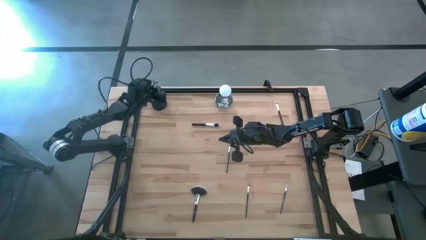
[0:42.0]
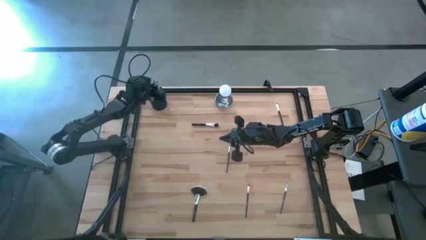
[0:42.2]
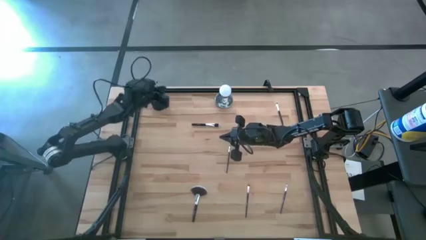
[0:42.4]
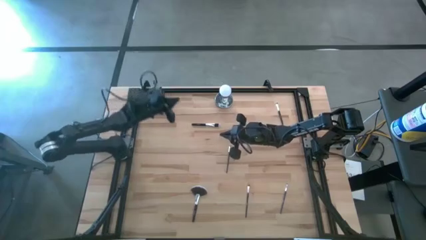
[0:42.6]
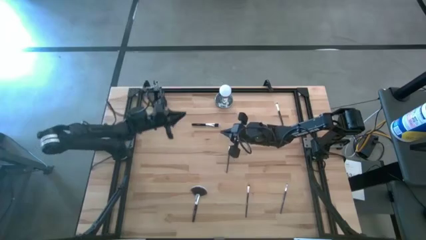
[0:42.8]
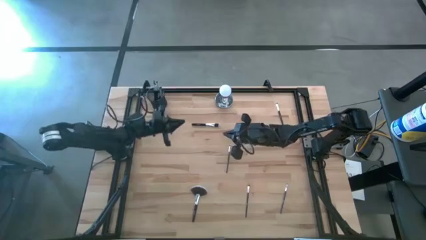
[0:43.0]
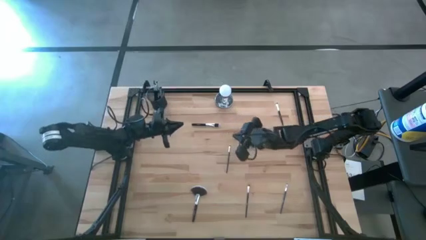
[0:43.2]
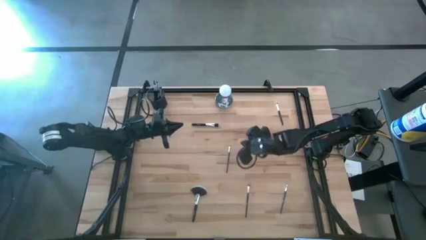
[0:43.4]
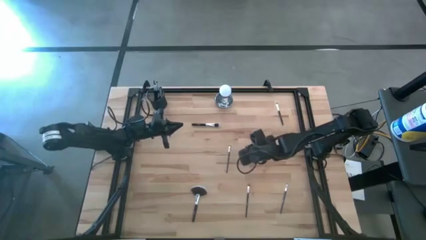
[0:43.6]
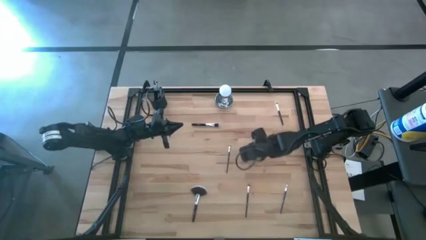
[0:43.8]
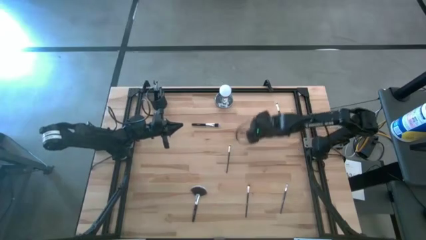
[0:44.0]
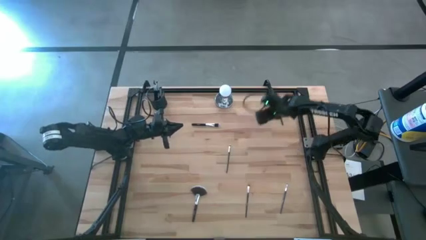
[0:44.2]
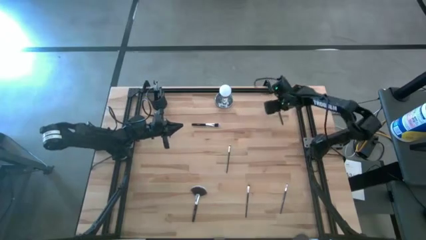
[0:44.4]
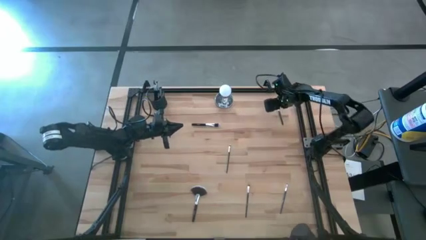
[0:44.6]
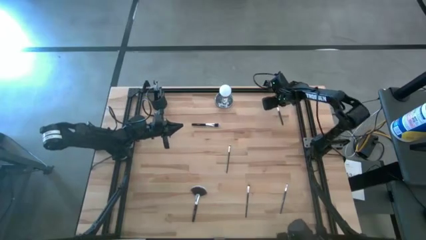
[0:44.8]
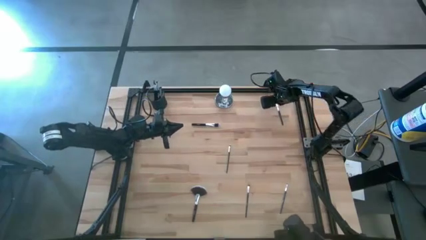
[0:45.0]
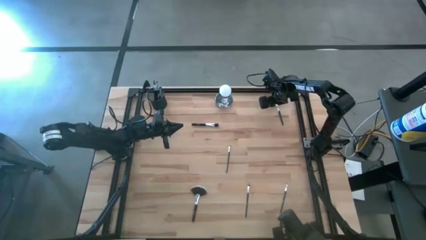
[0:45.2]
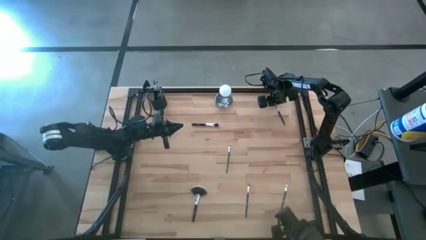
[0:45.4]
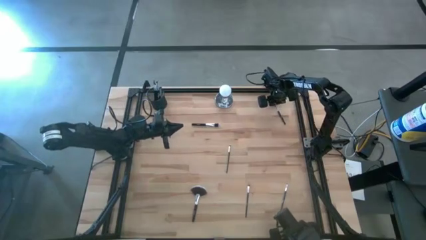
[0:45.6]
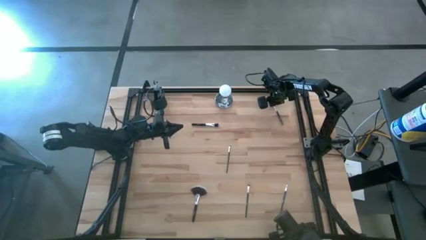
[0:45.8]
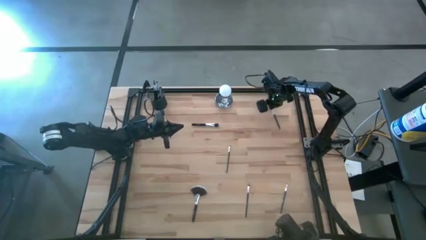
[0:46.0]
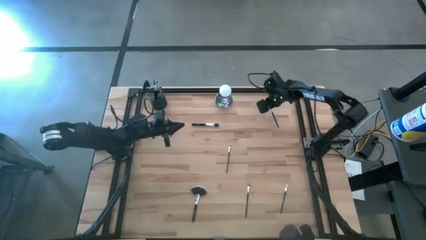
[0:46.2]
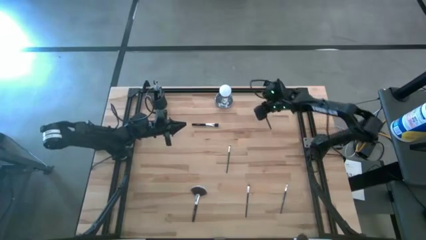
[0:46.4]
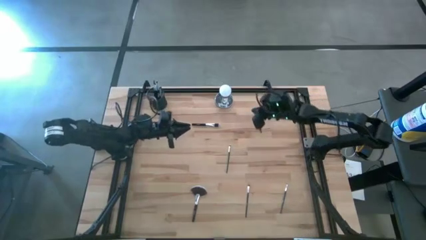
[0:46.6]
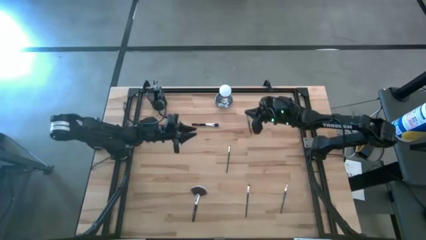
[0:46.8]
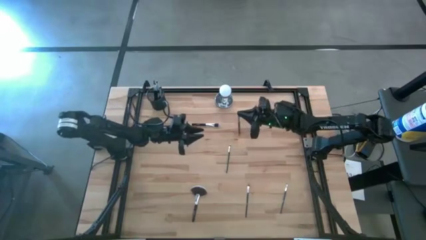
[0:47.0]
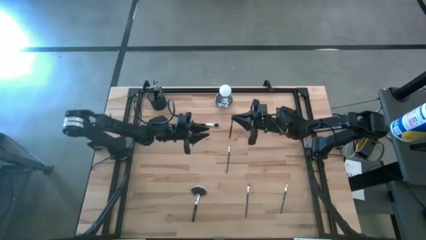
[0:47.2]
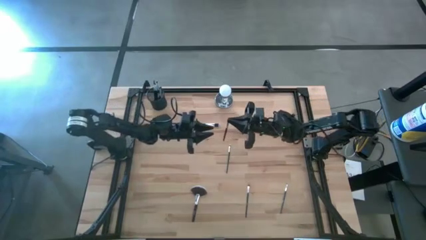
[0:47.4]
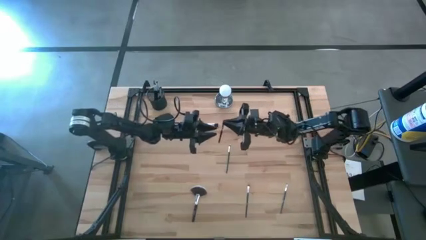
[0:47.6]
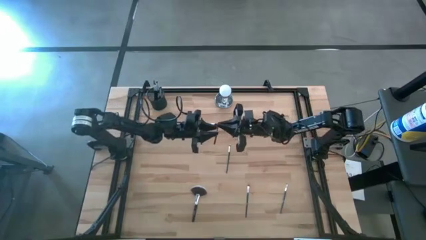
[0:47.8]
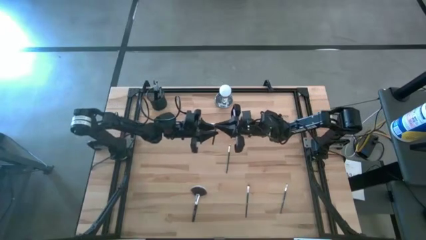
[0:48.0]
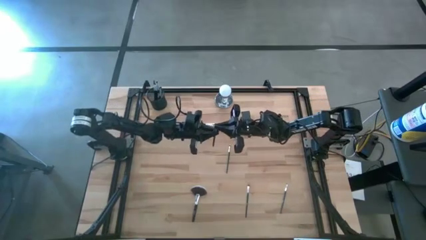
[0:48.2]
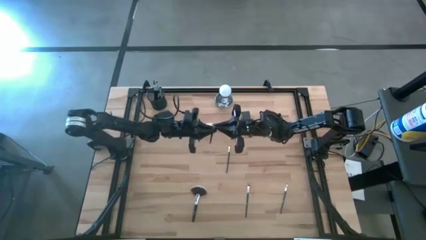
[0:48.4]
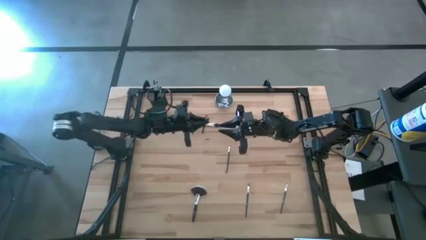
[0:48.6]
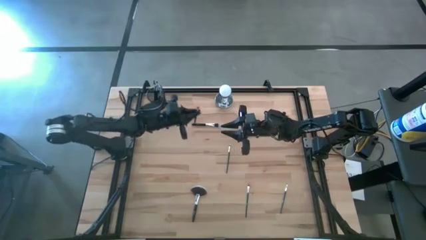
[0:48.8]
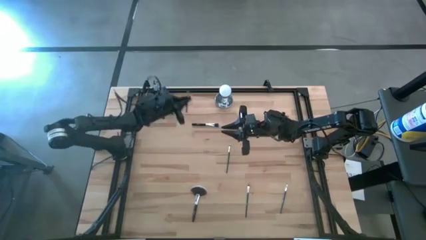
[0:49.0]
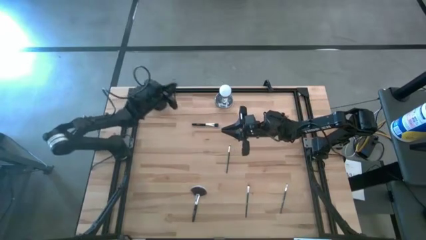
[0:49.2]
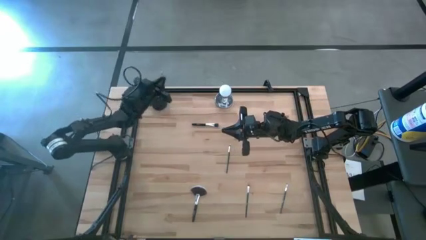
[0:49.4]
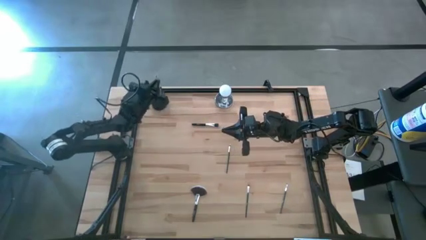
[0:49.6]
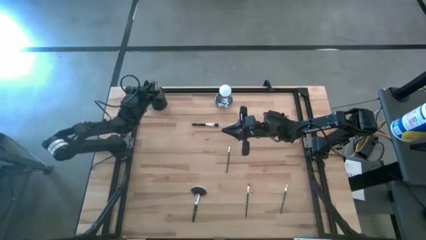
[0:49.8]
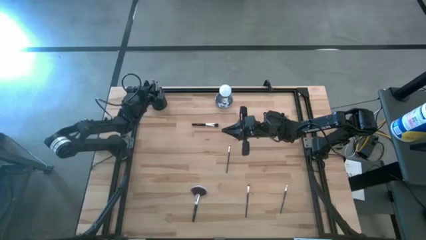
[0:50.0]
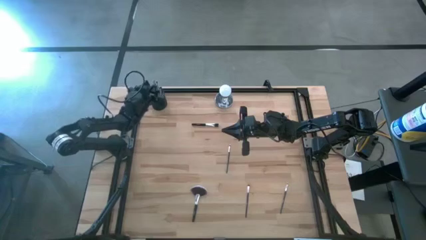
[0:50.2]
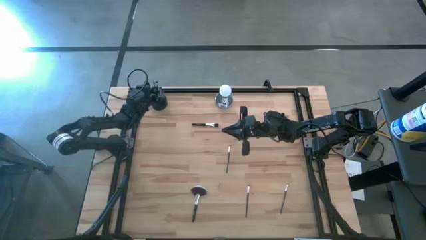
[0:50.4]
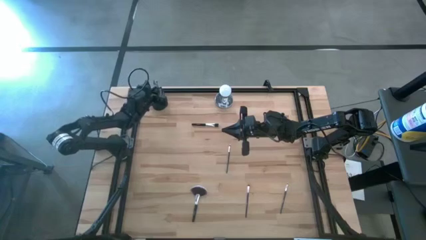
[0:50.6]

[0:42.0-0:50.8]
Task: Put items in baskets/containers
Put the black eyeshadow brush into the black brush holder

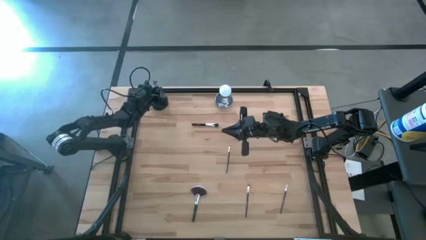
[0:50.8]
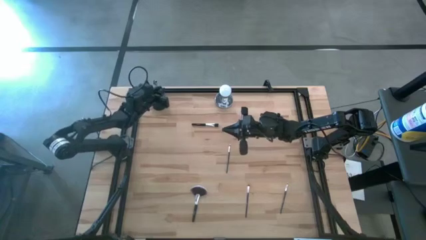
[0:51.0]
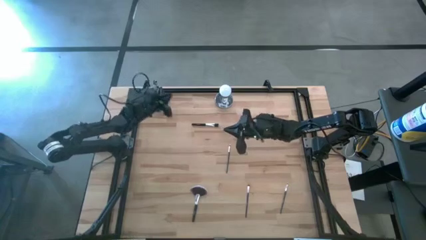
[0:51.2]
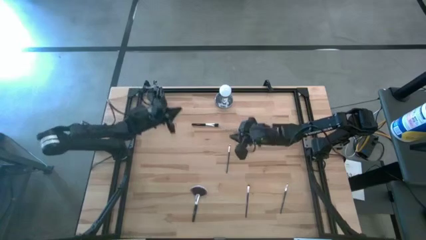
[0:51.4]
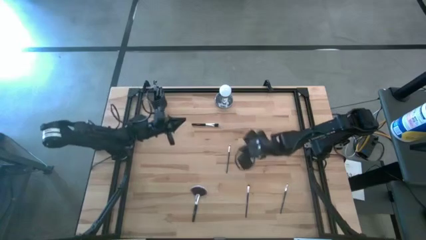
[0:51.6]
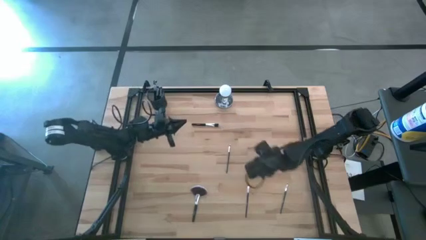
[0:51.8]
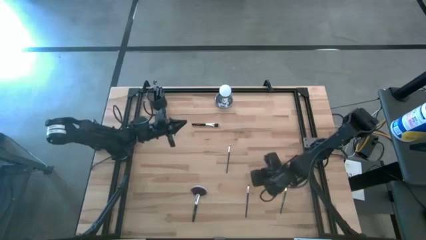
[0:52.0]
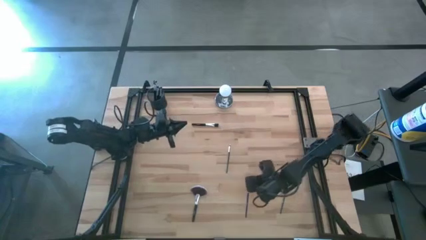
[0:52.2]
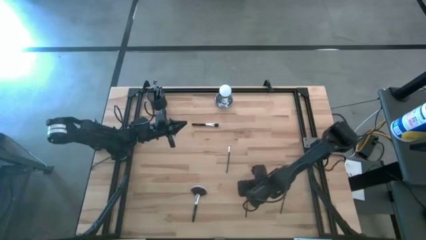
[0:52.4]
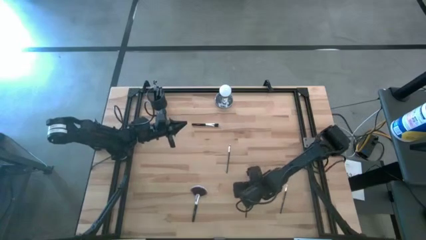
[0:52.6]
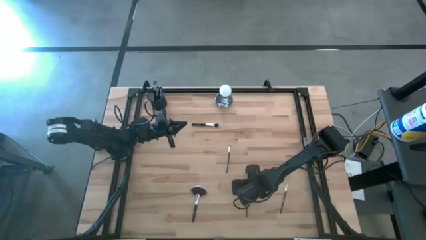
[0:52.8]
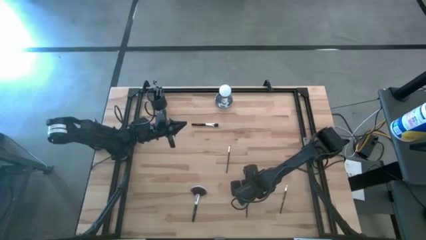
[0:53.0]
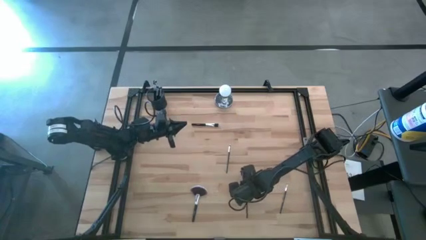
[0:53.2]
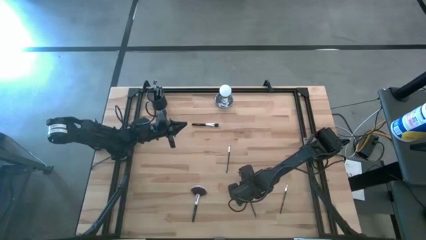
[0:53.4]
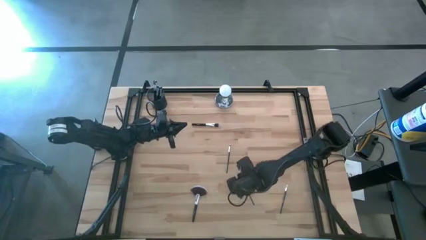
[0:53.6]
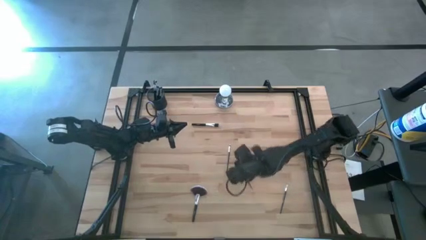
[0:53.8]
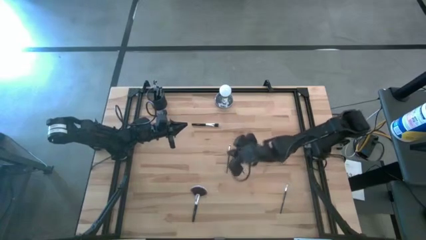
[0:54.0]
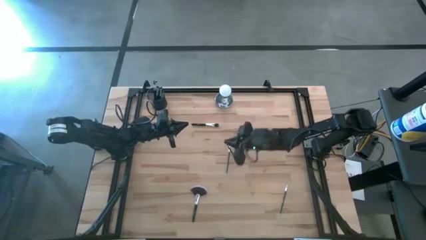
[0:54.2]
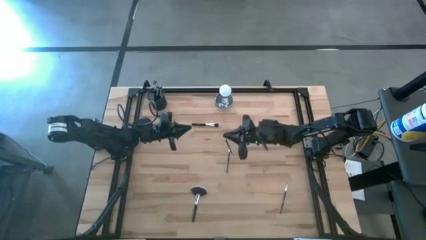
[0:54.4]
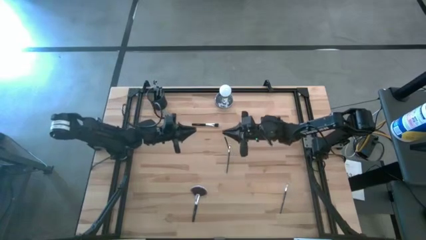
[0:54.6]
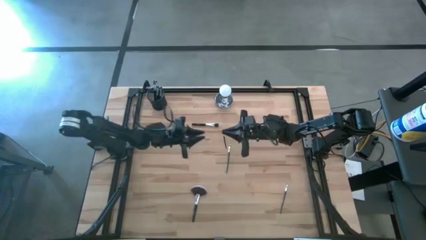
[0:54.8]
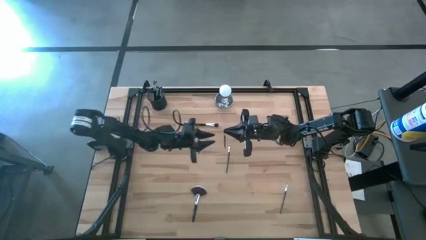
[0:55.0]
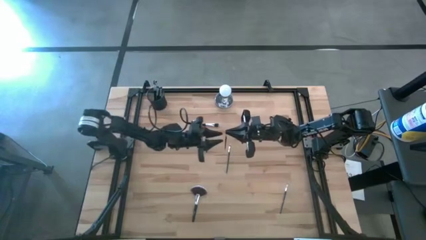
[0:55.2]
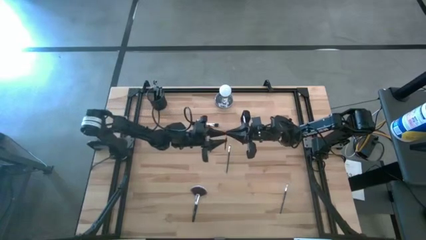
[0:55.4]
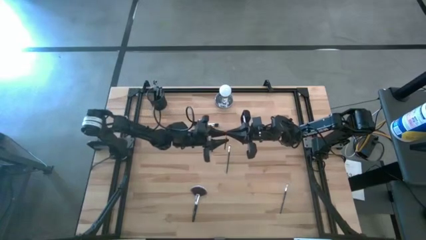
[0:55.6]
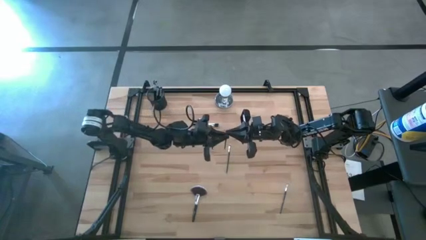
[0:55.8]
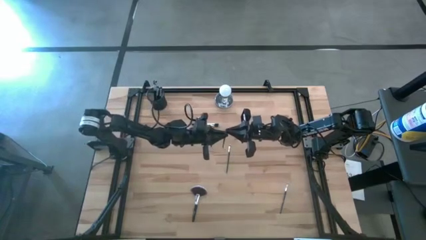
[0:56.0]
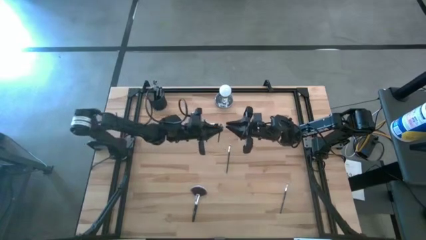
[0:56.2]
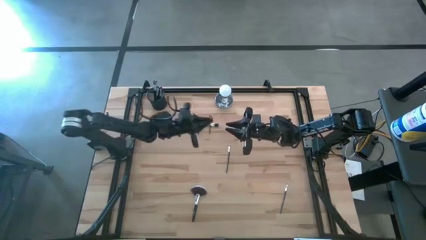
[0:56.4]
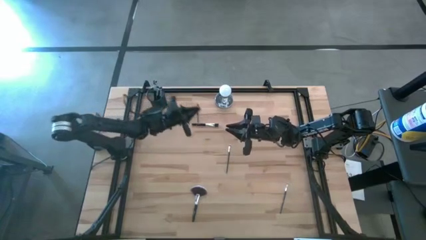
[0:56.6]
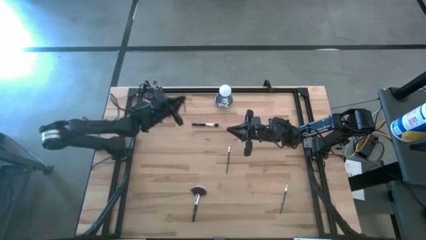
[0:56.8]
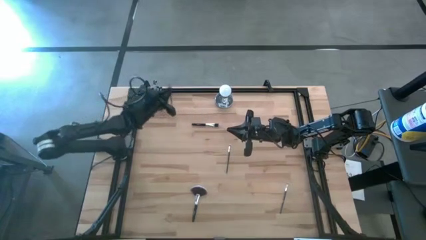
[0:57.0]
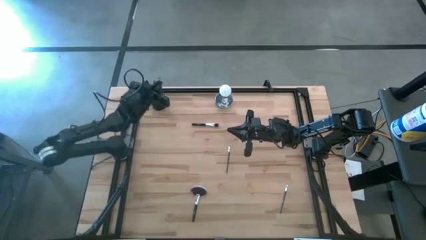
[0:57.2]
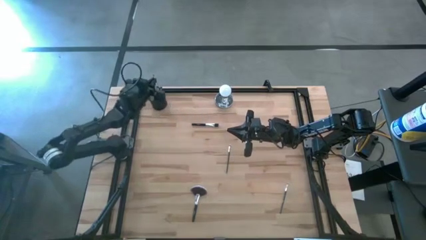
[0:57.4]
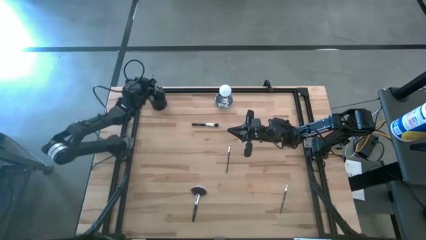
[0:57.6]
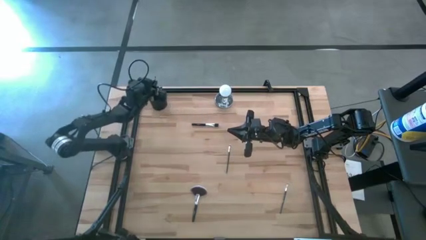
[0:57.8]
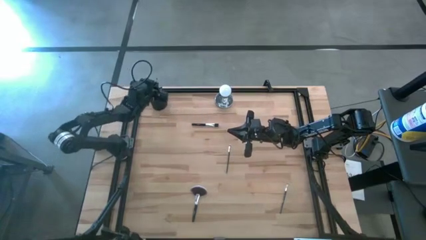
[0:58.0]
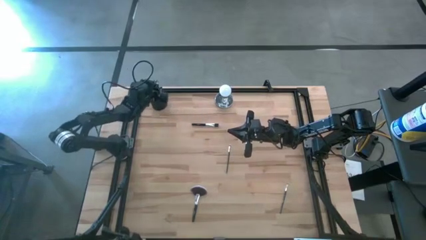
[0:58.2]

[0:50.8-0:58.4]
Put the black eyeshadow brush into the black brush holder
